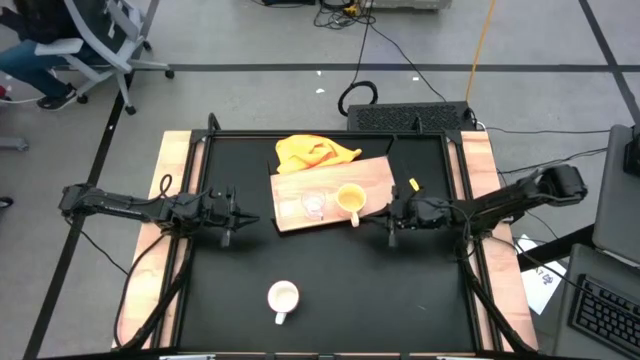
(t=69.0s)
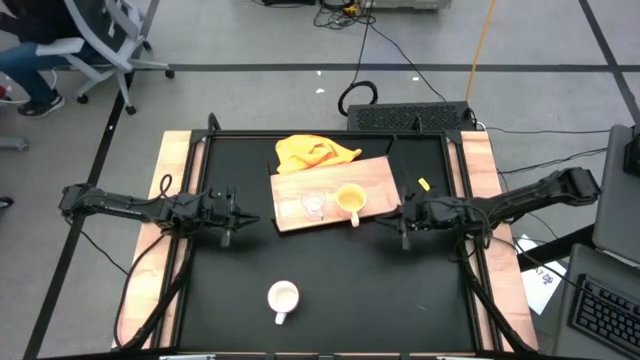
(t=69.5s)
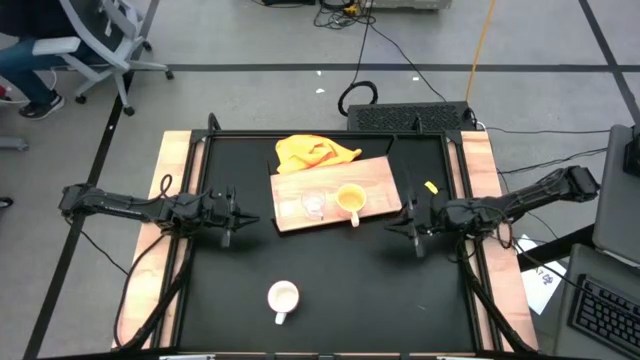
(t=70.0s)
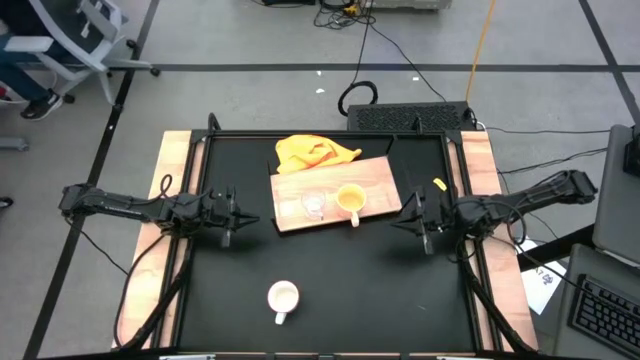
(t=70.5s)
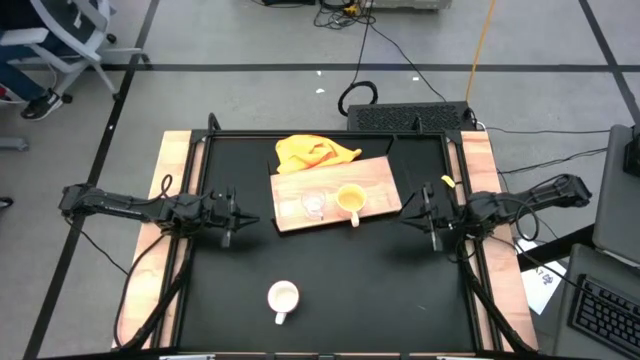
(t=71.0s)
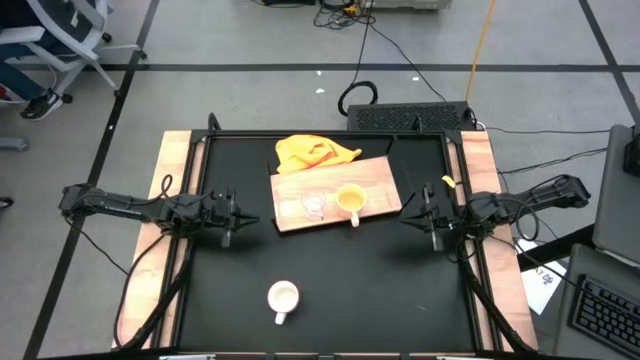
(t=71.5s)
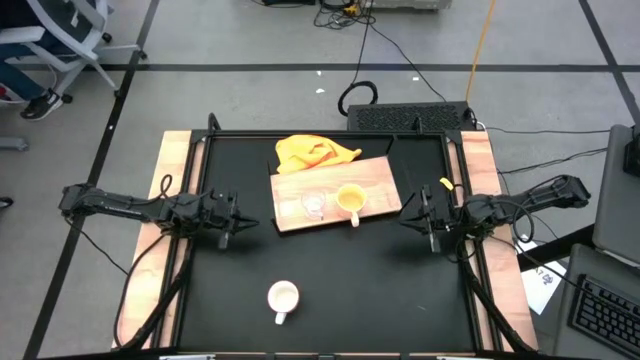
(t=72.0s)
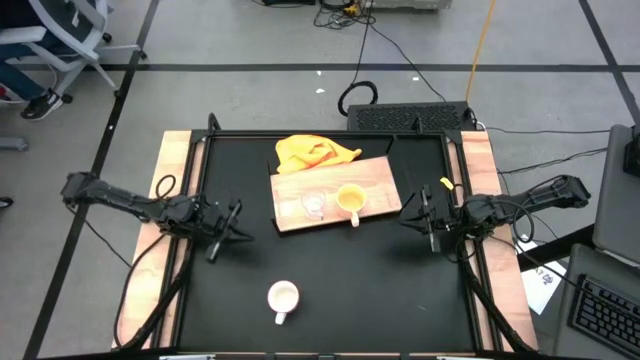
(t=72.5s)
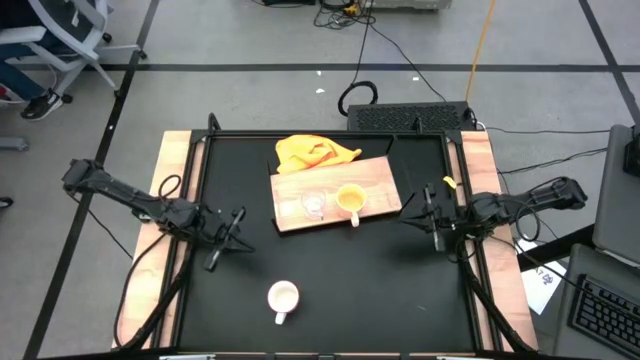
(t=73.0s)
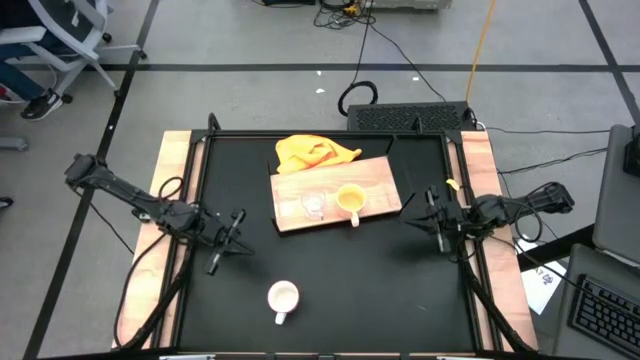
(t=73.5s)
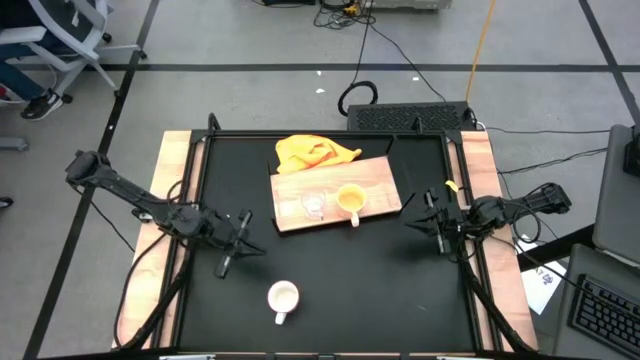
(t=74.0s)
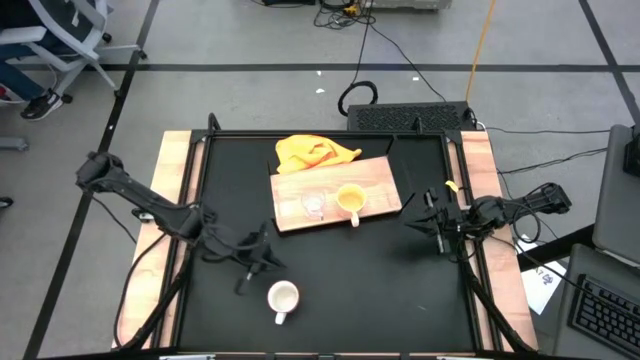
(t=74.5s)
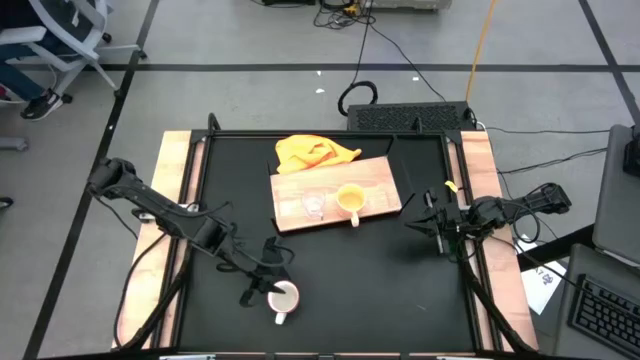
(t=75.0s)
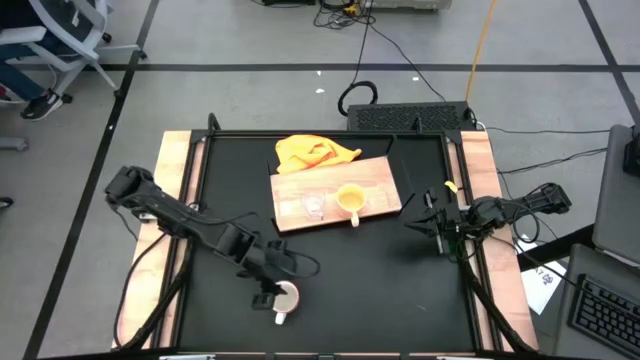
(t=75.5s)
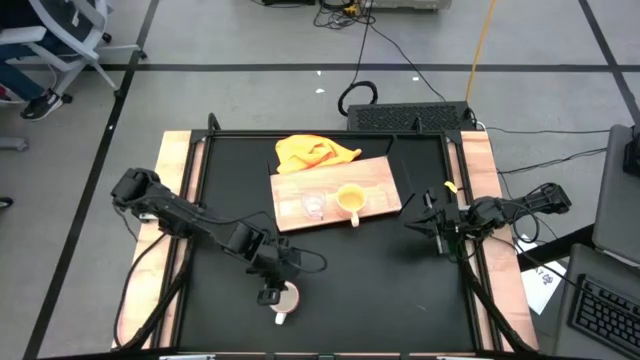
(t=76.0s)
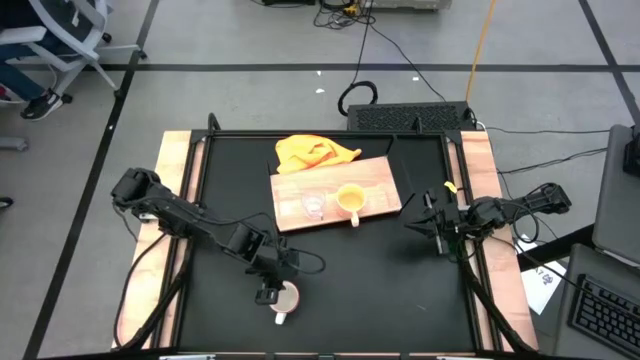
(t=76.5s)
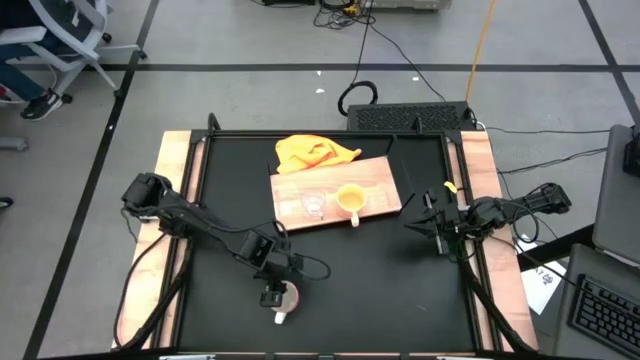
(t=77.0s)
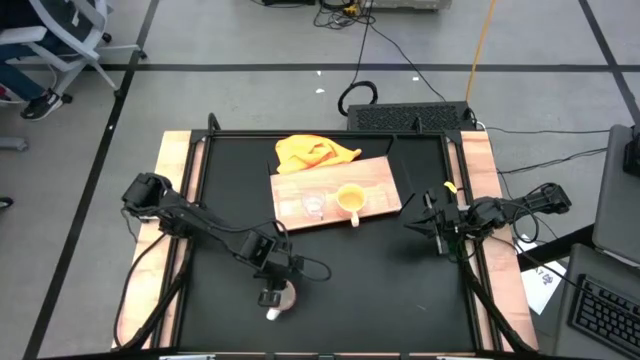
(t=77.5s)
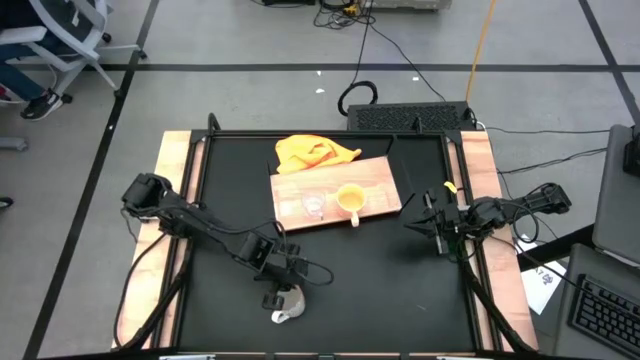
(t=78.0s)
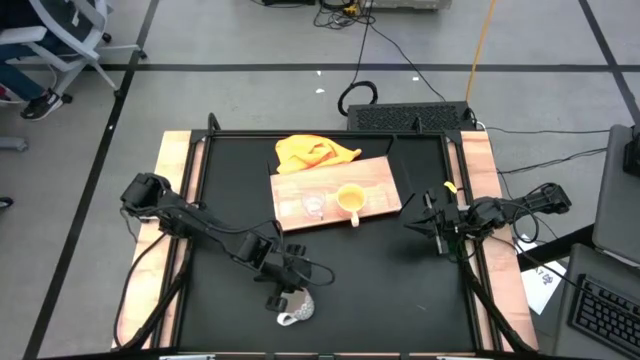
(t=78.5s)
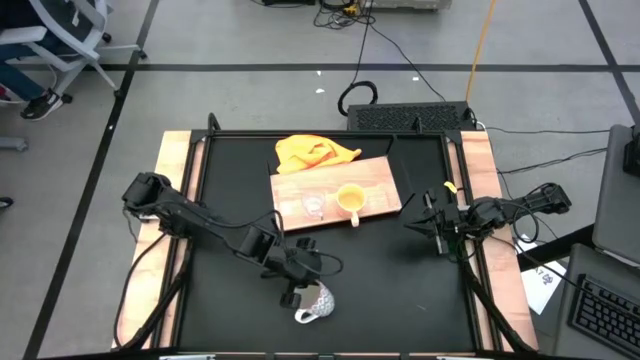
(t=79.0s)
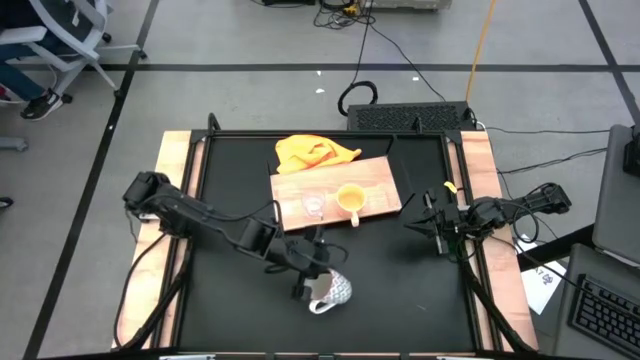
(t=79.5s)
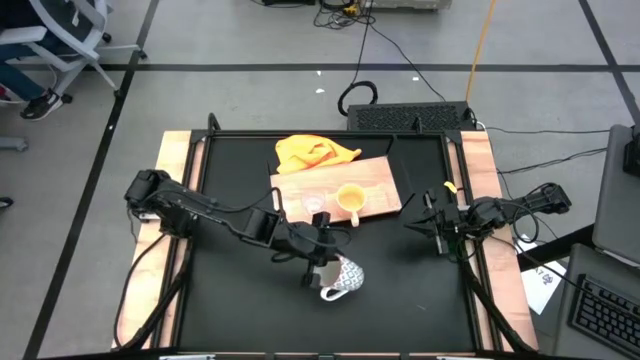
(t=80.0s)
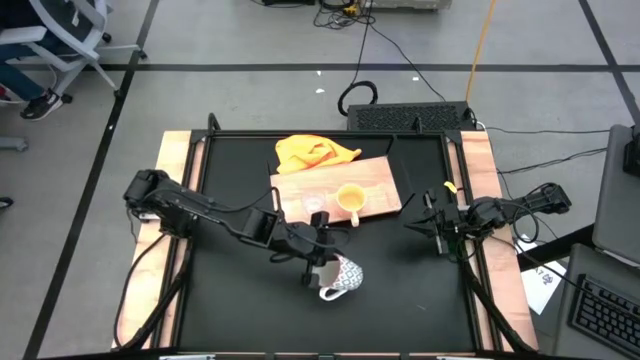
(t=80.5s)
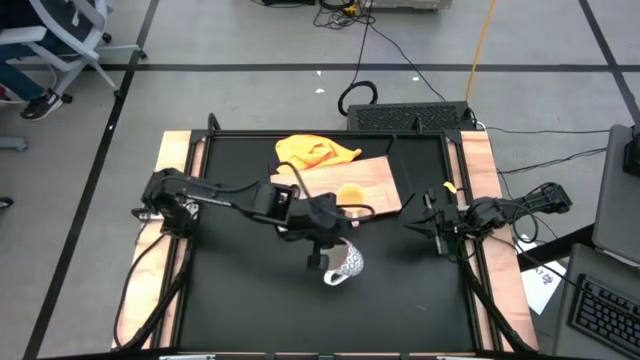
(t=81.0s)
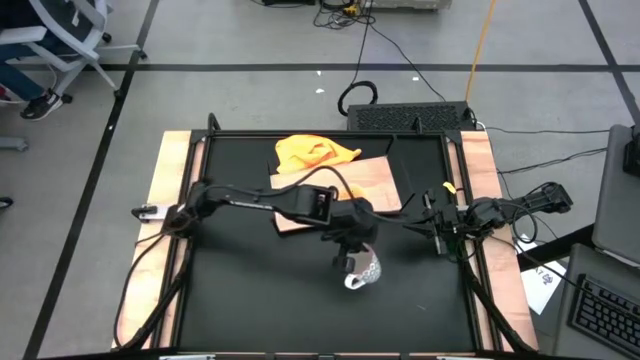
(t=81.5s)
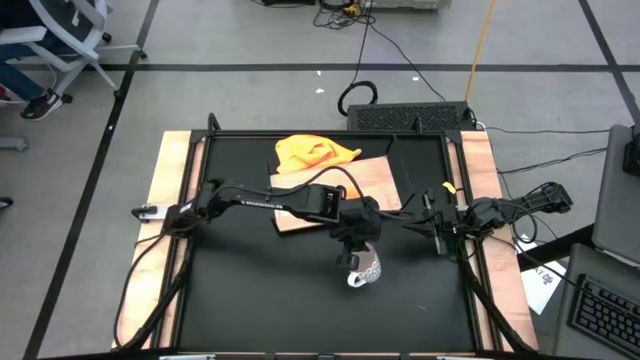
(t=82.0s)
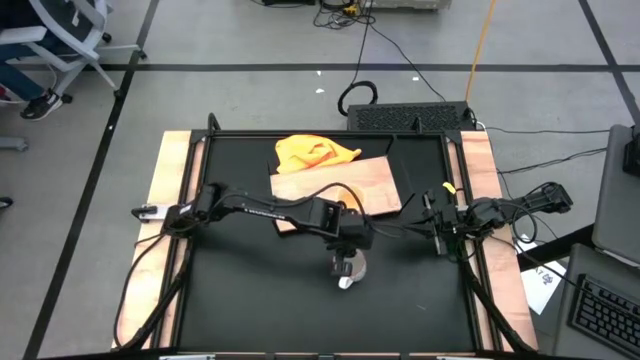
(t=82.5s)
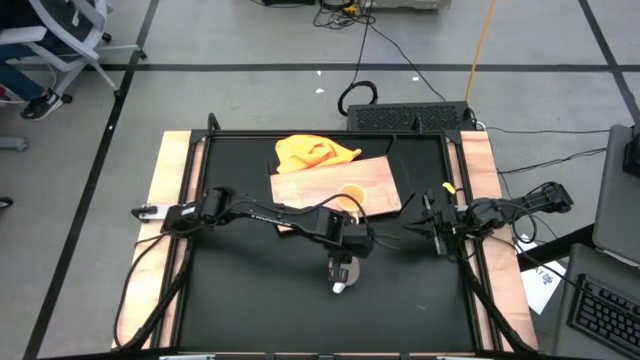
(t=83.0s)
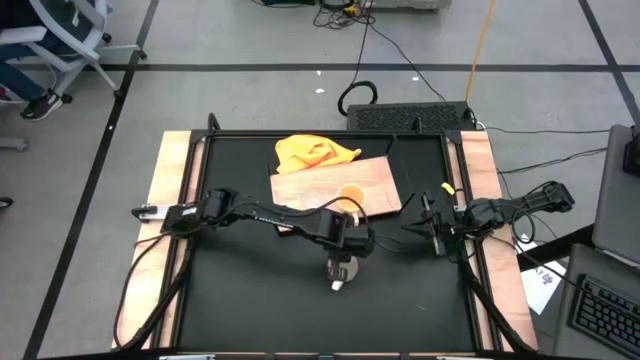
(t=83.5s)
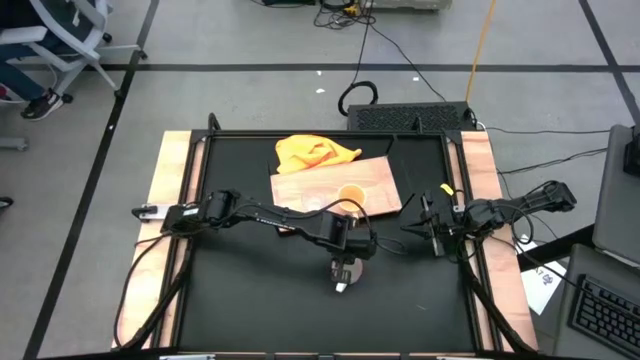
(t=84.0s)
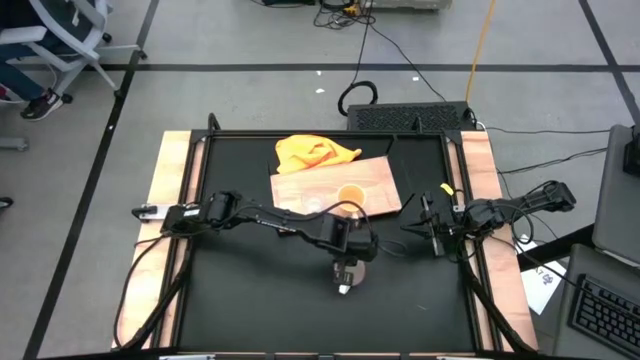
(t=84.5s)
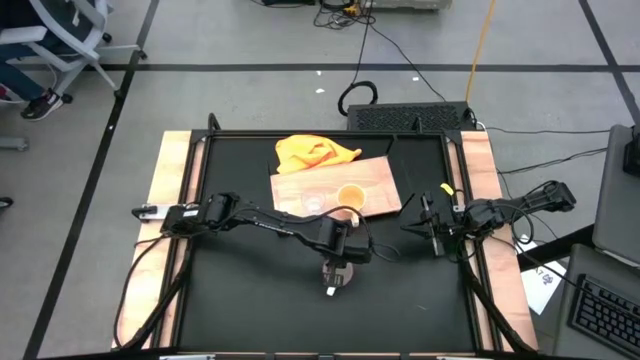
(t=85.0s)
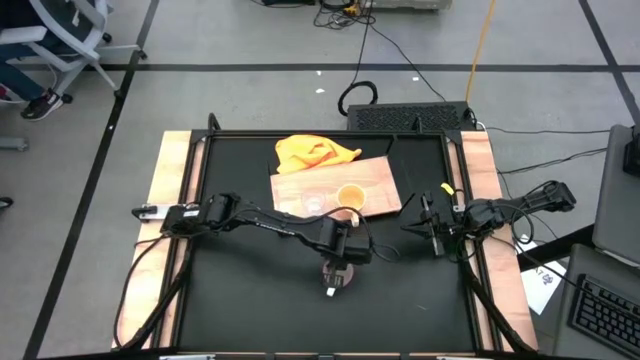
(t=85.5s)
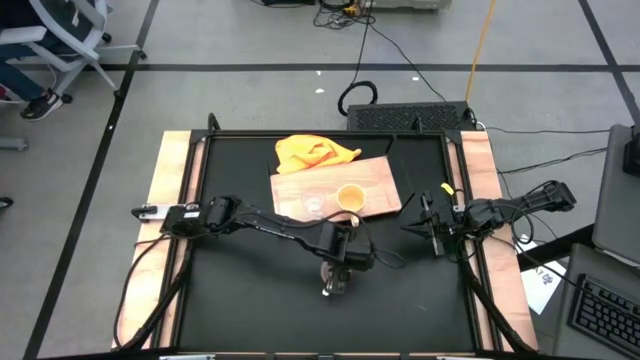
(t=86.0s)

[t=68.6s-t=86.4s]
Task: Stack small to large cups/mugs on shelf
Put the gray patterned mug on the shelf

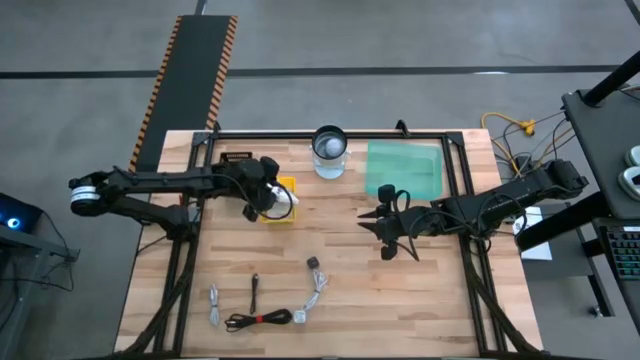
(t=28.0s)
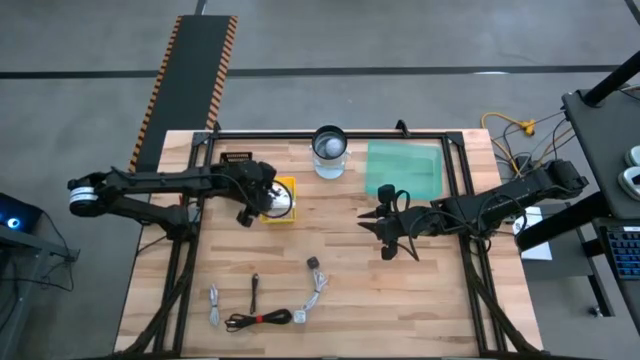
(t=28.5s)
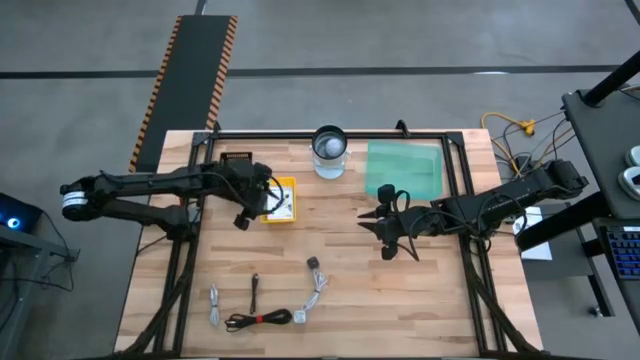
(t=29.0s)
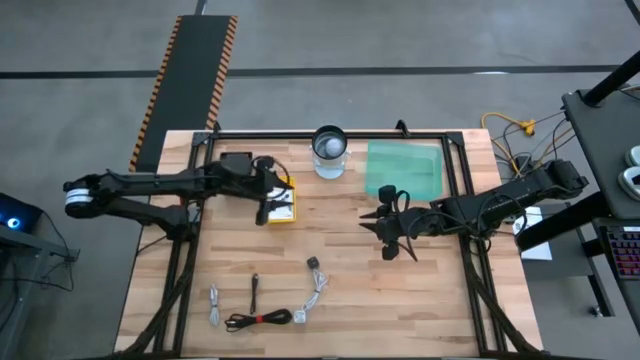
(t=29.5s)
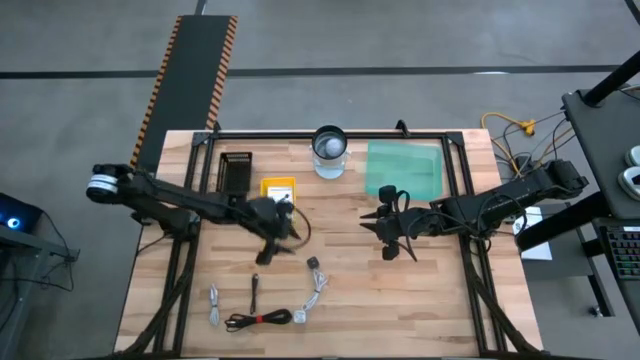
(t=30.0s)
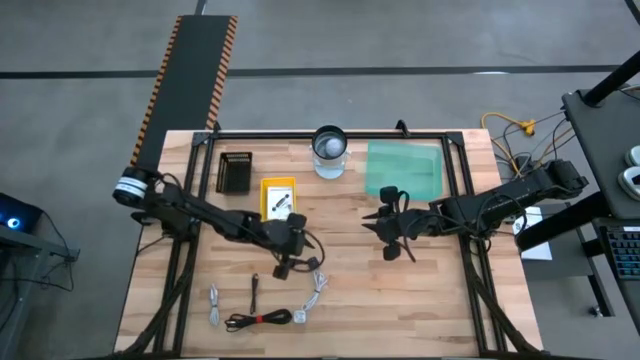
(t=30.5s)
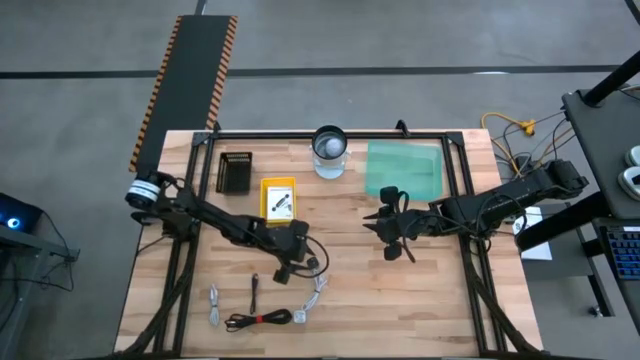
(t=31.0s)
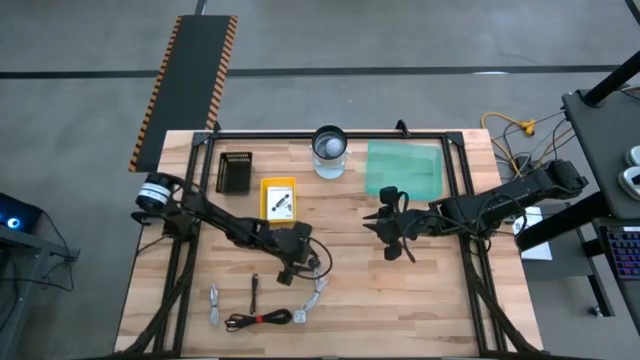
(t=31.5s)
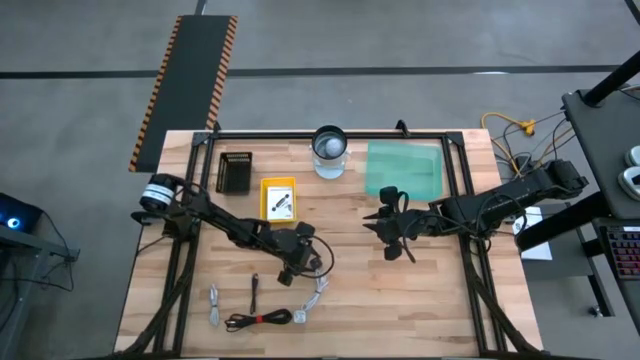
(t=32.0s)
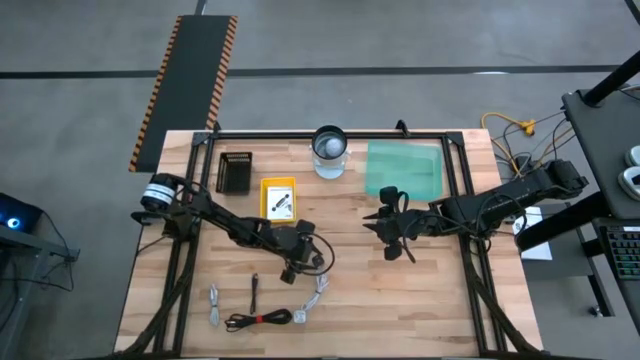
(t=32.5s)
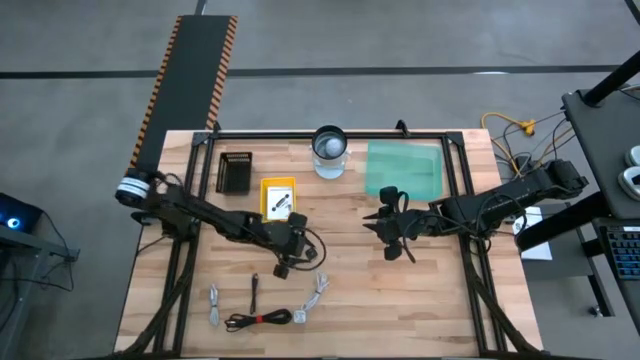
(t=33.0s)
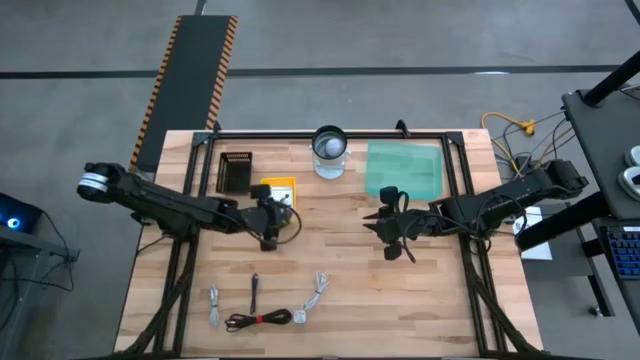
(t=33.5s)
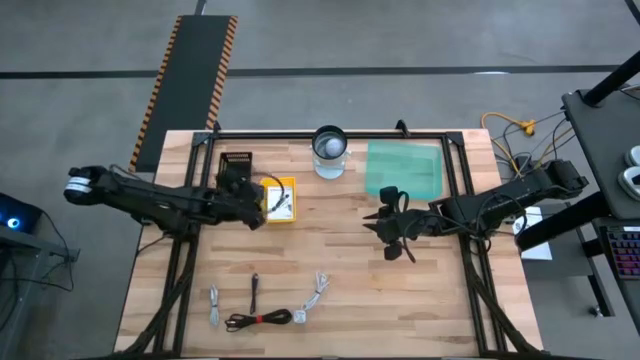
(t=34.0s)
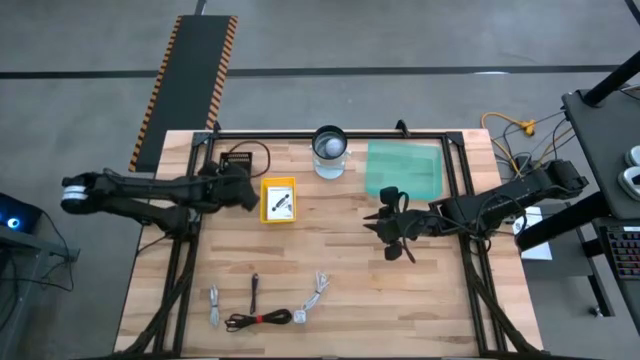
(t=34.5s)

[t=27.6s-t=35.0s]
Task: Pick and place items into bin
Put the black charger adapter into the black bin
